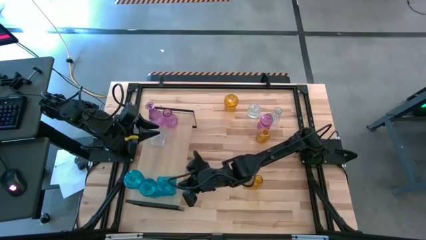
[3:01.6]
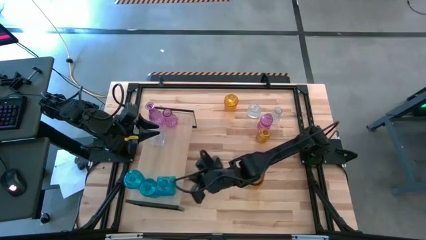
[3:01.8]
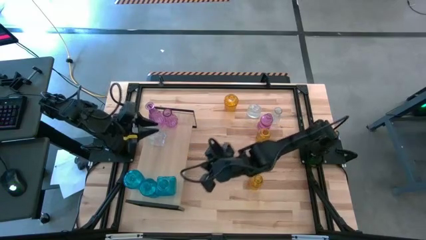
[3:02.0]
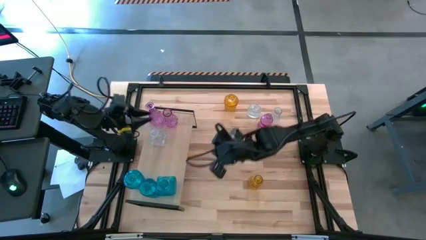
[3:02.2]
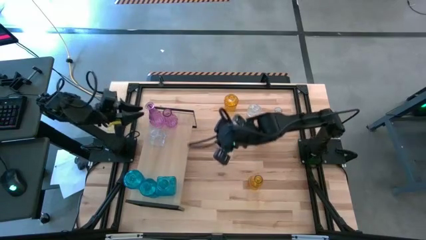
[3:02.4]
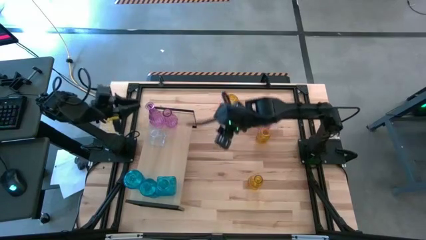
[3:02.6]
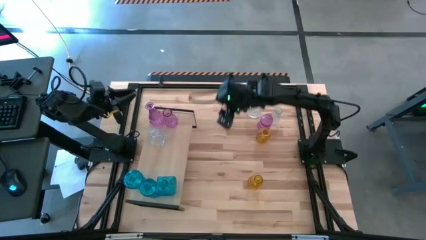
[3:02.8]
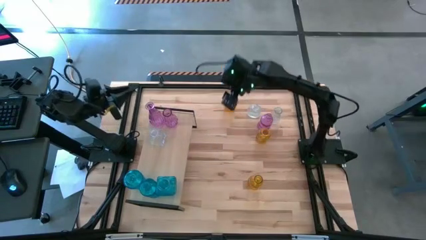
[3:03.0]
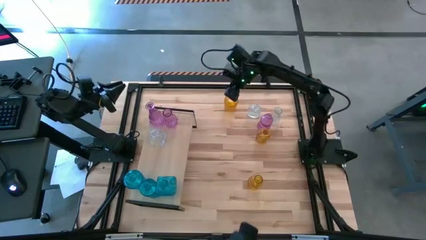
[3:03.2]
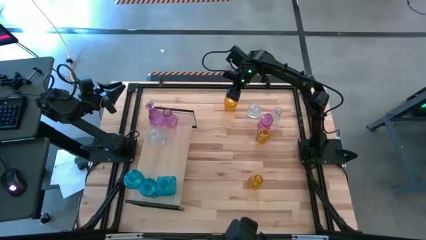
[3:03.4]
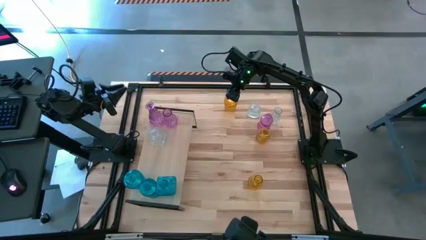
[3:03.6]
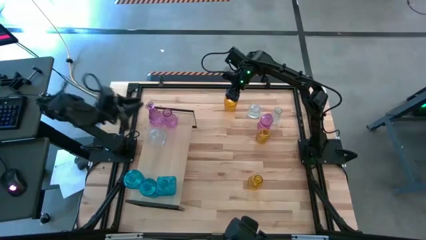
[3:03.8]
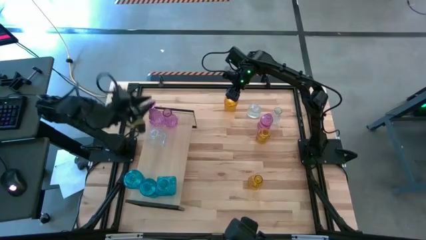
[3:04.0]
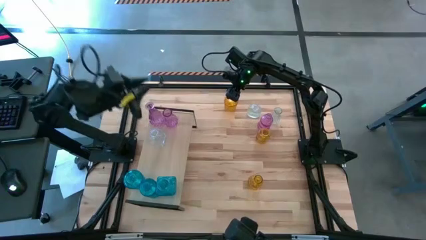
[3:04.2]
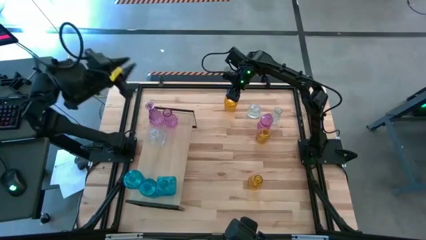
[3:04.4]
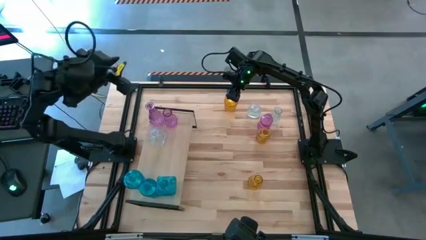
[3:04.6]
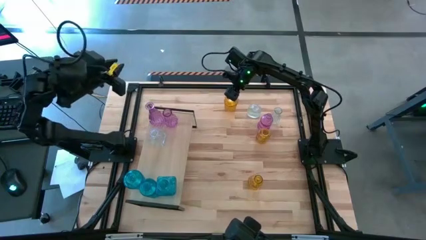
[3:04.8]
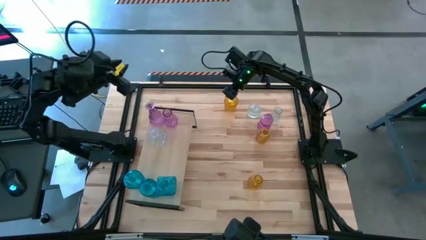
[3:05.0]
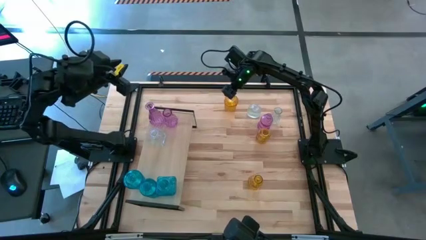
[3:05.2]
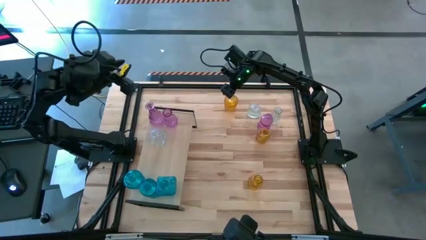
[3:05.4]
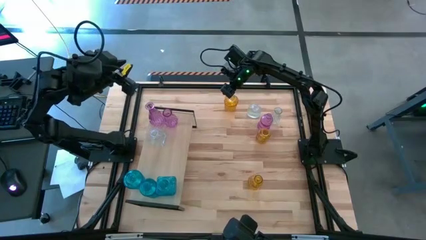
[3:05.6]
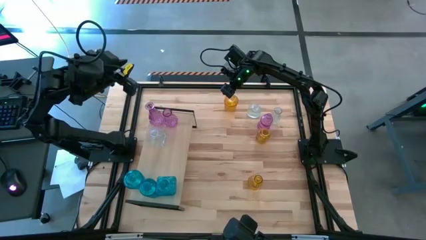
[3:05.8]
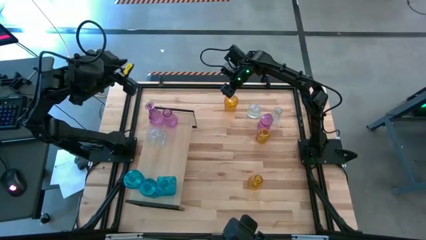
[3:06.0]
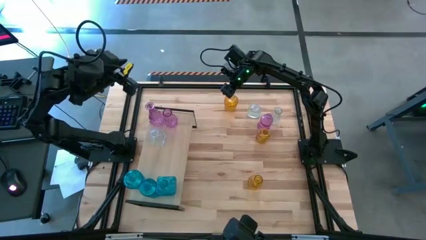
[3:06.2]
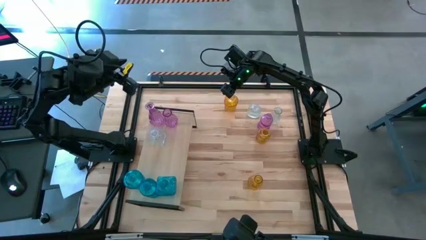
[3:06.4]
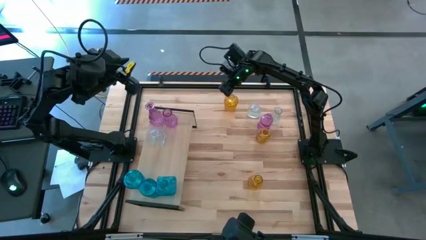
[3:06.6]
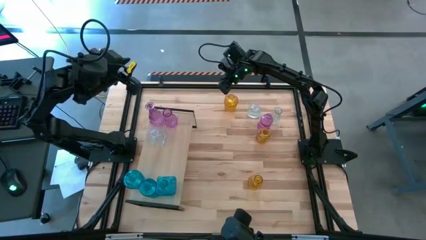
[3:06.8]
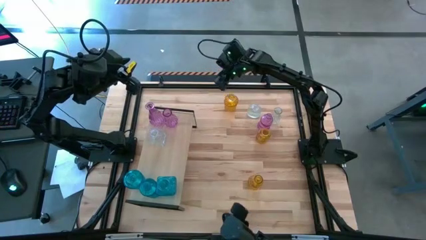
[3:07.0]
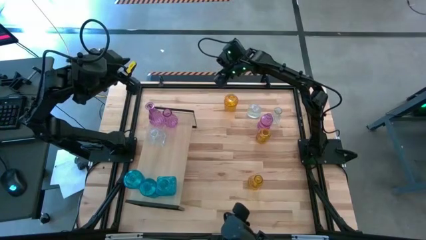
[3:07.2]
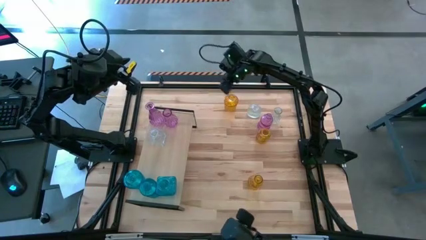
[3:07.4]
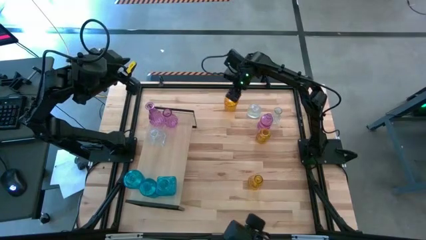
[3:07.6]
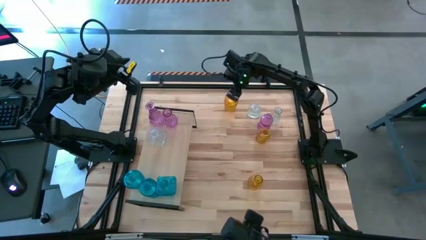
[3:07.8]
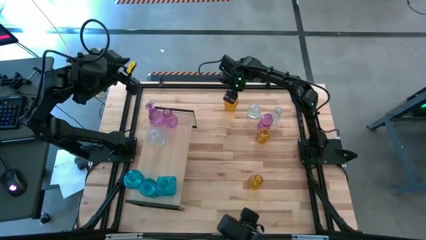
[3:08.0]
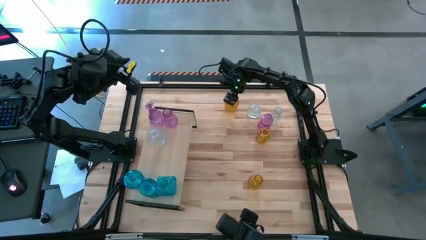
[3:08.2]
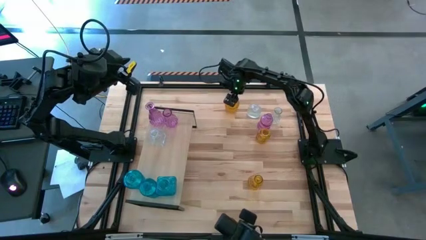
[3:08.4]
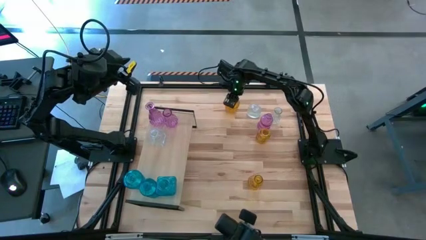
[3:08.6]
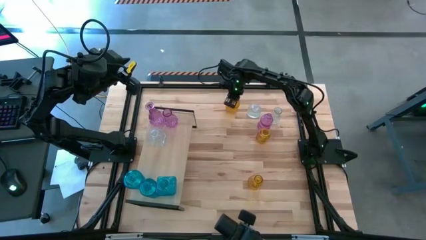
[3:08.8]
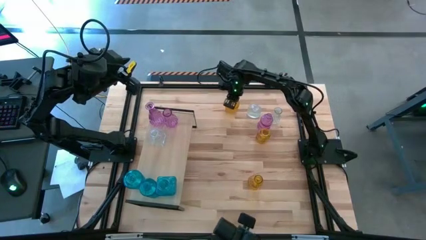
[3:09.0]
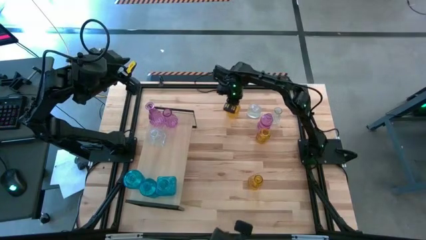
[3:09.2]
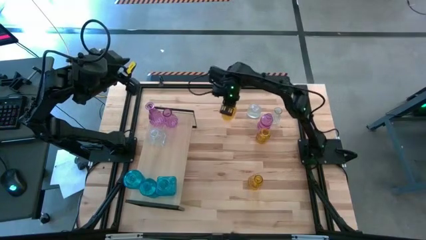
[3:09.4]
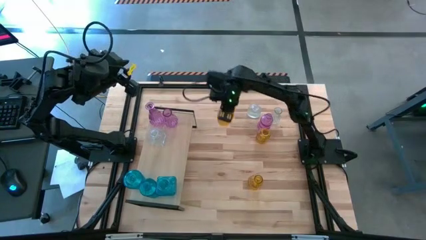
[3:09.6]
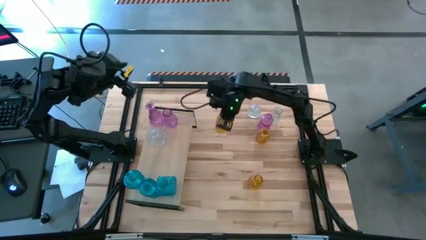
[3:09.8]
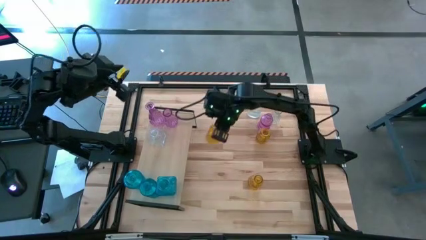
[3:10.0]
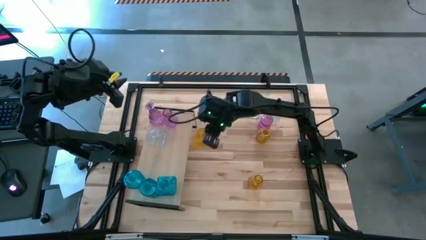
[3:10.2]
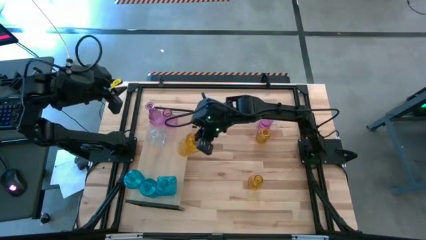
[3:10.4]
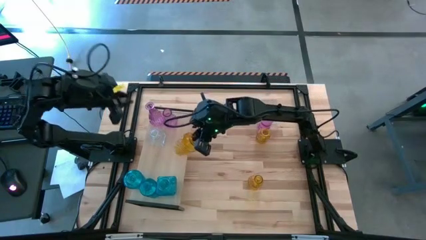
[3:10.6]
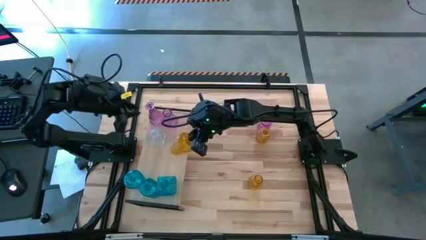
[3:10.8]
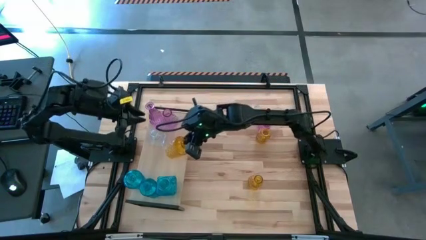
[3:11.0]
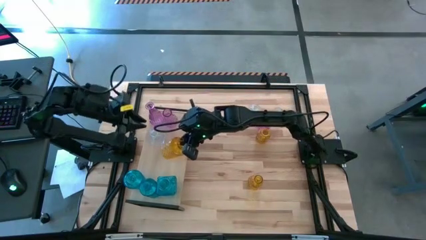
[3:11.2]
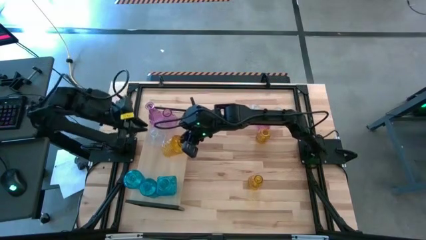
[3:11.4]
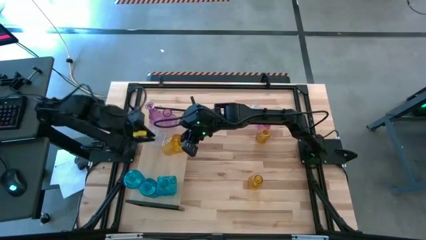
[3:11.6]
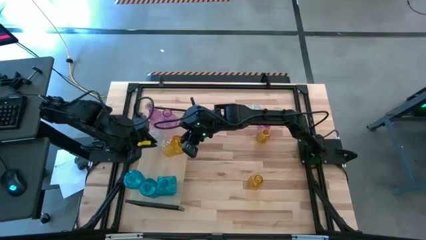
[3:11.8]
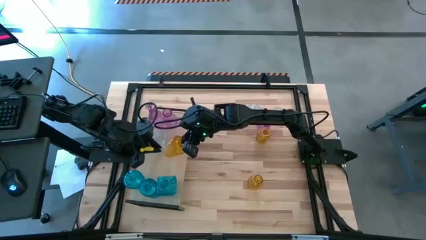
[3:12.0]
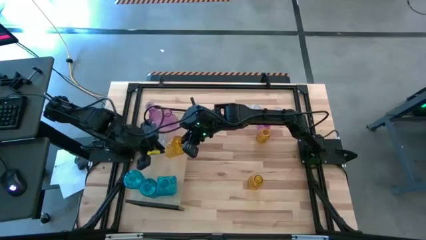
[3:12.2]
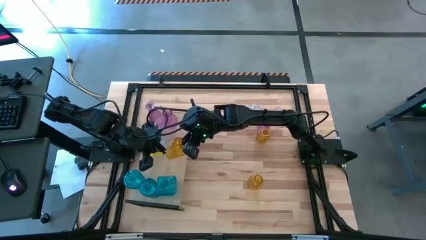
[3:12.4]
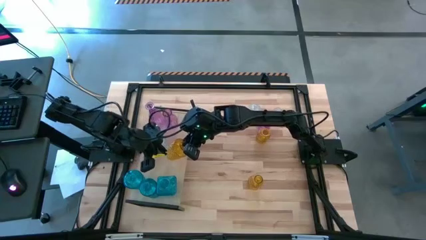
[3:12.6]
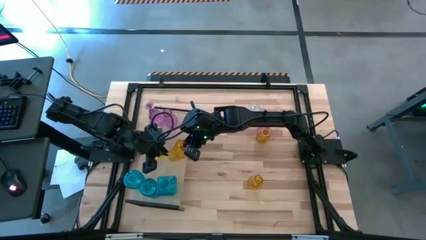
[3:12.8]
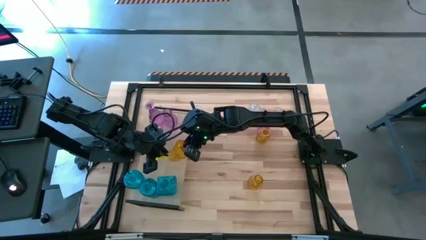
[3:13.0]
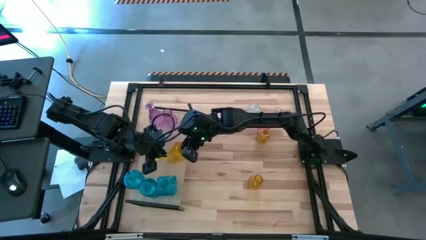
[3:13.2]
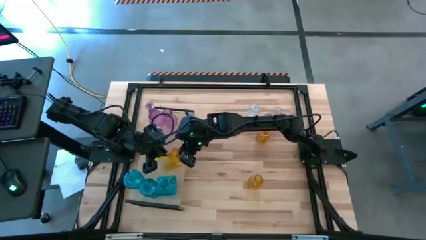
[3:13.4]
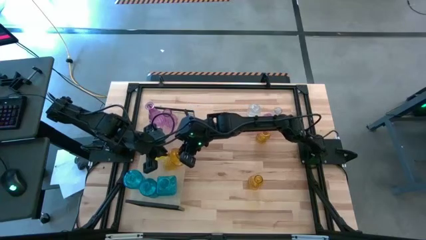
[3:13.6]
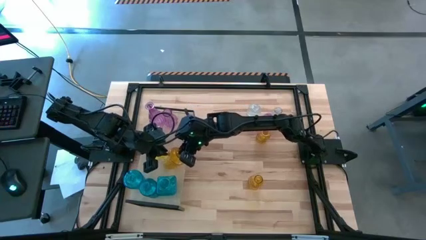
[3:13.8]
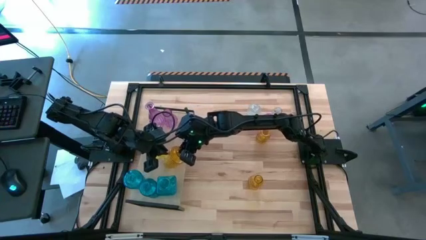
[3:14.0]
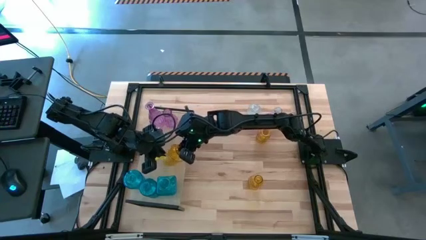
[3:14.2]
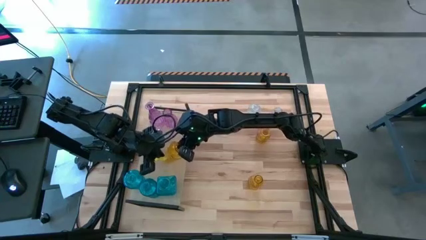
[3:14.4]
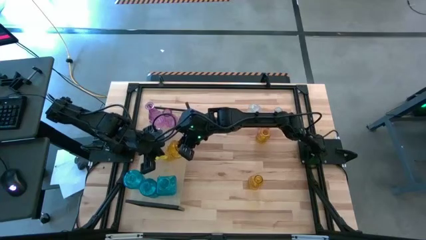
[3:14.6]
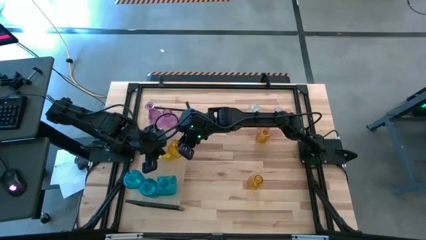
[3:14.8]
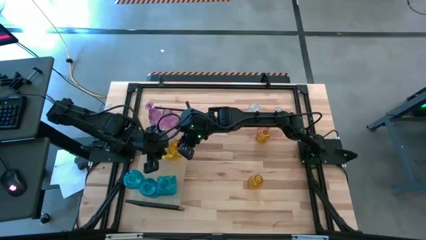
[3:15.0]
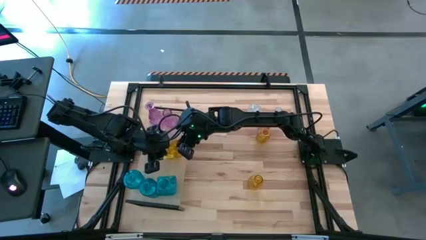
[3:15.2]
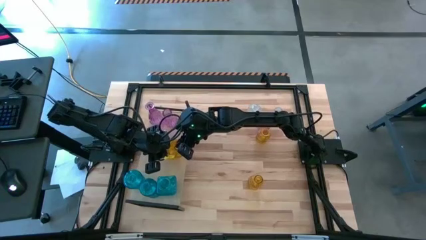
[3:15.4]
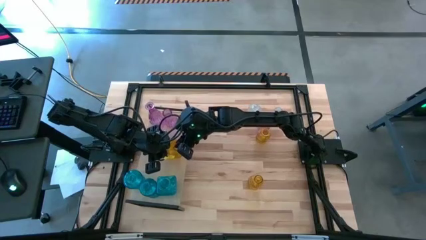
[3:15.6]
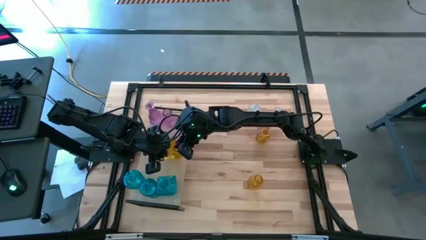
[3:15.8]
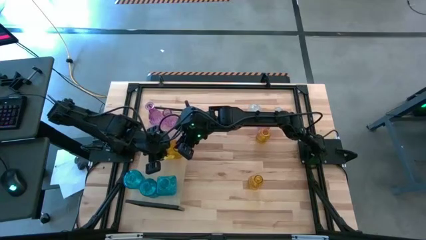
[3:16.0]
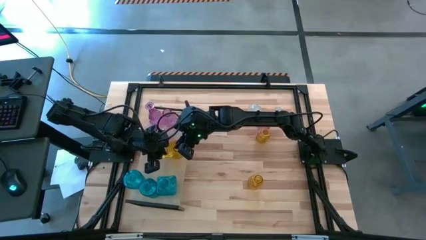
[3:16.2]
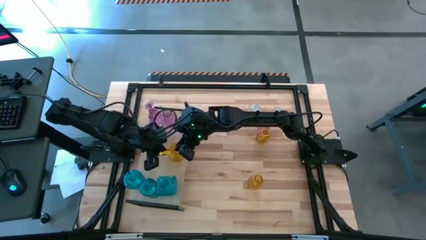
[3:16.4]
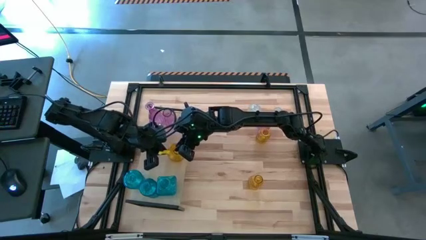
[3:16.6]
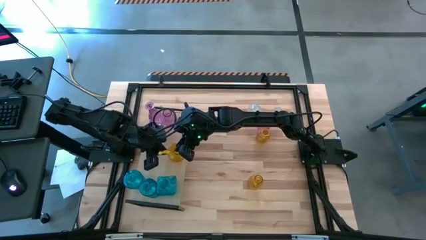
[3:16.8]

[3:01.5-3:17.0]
Task: sort vases onto shelf
Put the top left yellow flower vase on the shelf
